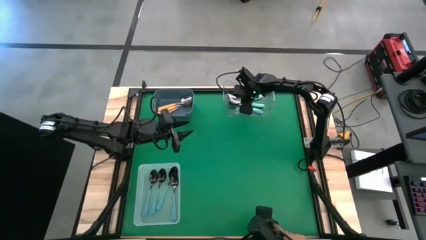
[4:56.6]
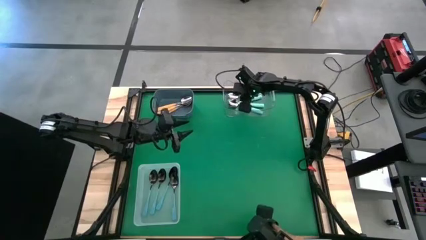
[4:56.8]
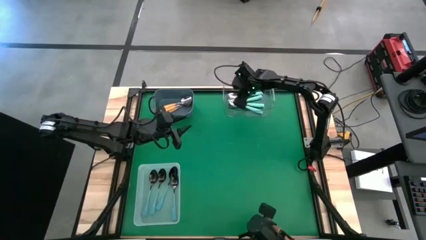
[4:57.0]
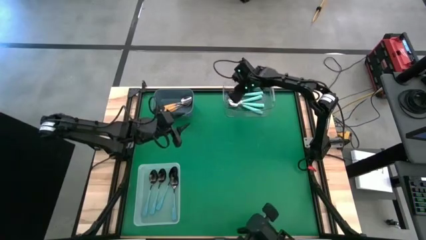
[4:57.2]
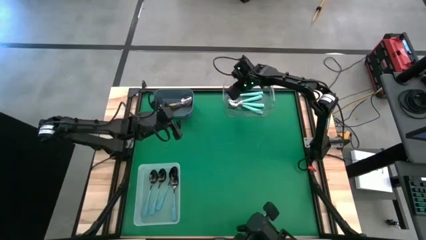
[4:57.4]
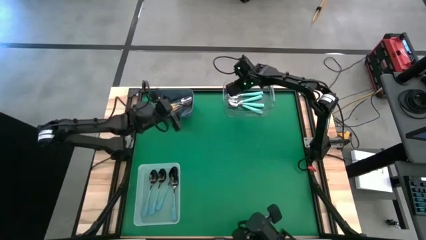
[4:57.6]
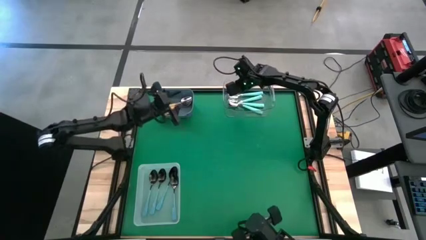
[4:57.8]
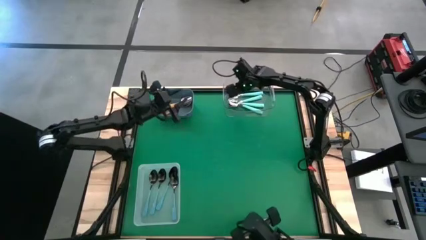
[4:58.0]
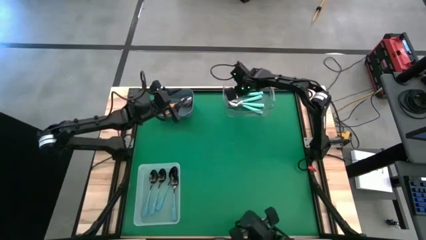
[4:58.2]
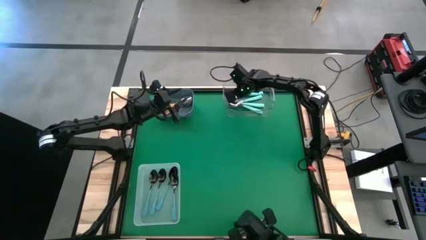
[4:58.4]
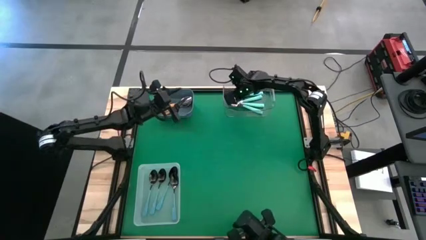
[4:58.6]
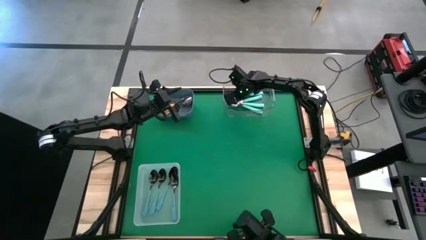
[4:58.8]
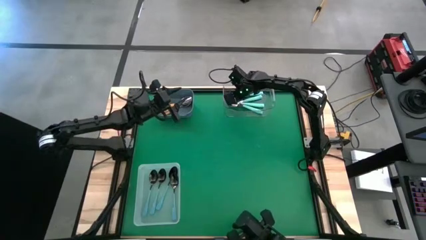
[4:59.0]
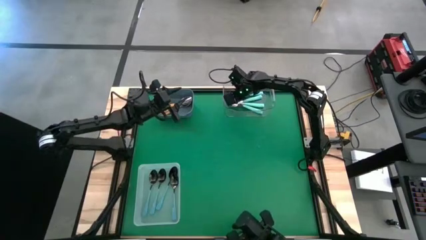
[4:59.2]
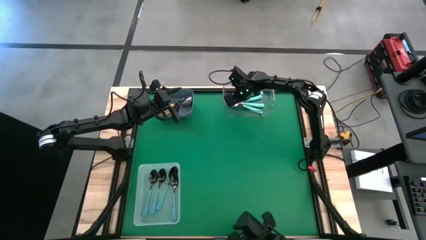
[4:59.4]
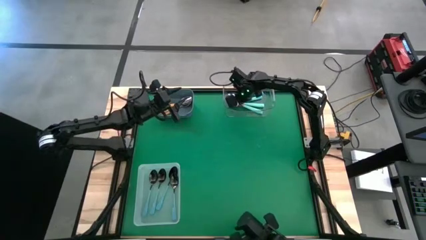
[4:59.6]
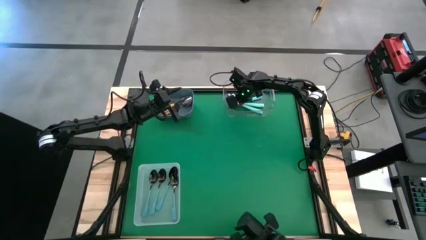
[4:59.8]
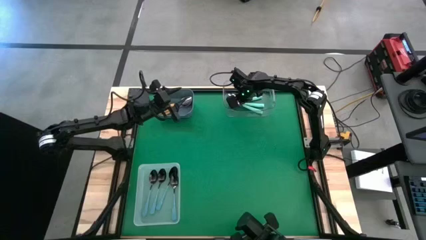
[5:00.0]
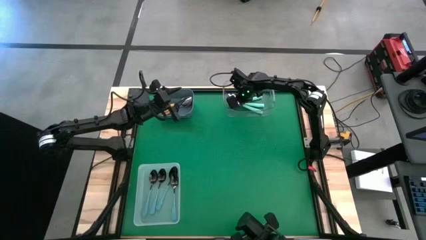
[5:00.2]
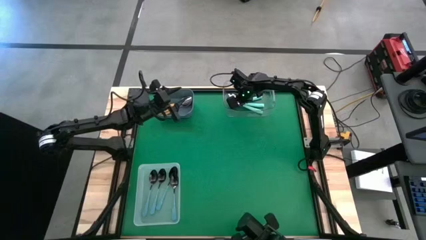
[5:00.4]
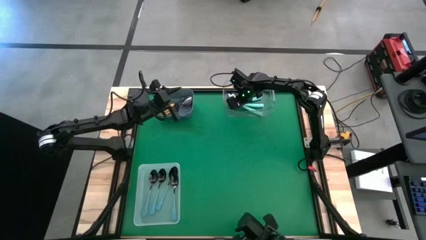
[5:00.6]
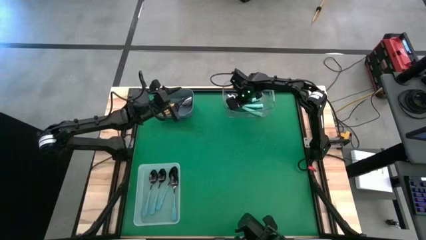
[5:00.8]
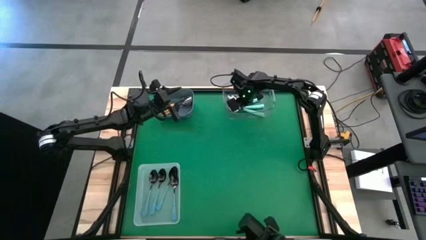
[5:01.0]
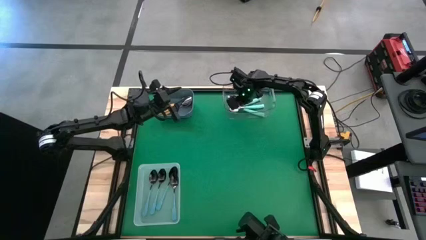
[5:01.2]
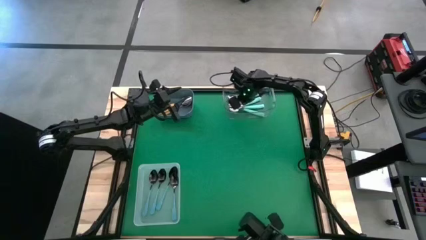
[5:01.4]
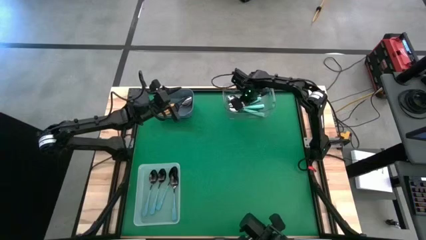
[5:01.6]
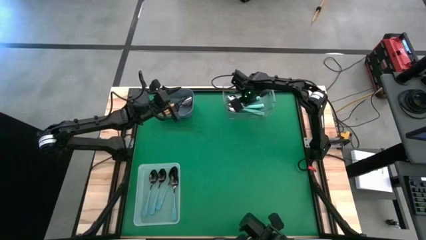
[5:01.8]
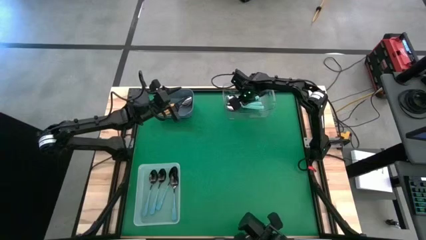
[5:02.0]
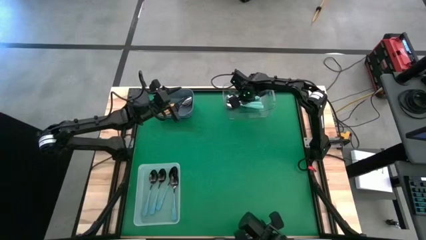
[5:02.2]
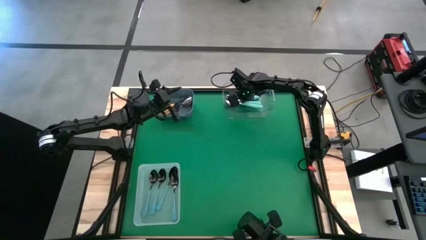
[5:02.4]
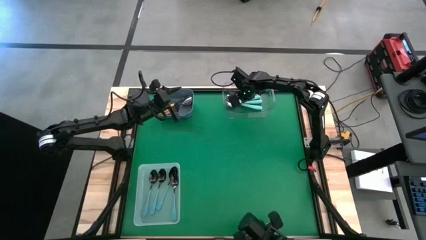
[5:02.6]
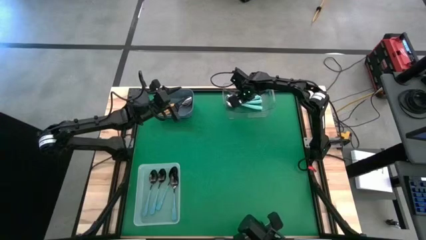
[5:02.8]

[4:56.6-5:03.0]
Task: Sort silverware by color (type)
Adjust the light blue spoon in the transparent bin

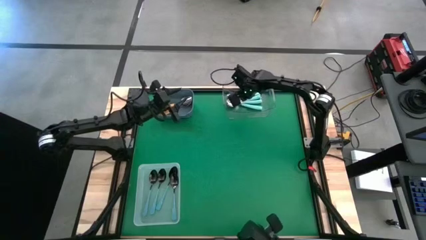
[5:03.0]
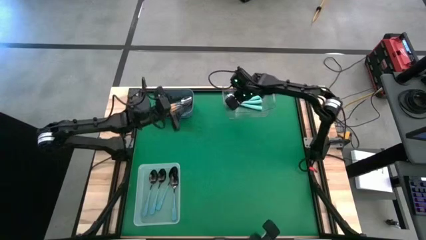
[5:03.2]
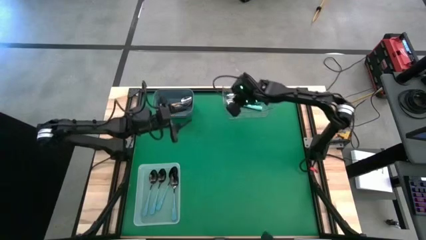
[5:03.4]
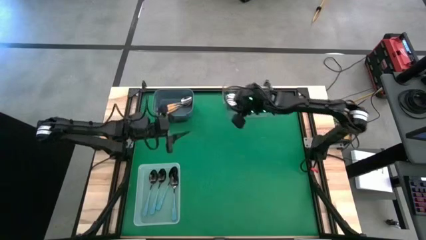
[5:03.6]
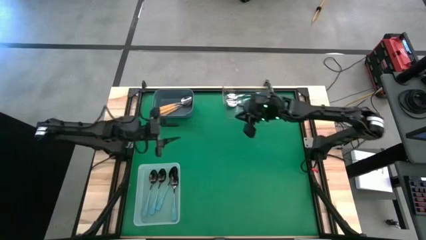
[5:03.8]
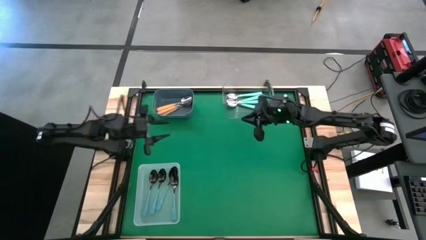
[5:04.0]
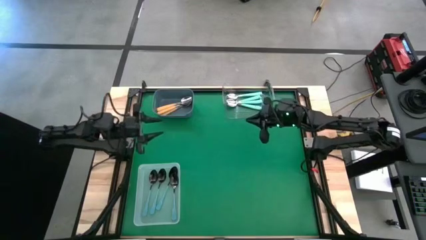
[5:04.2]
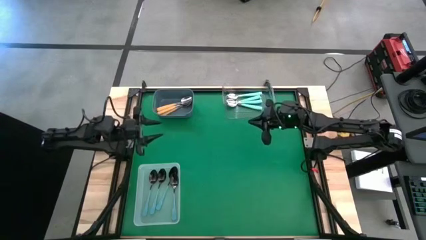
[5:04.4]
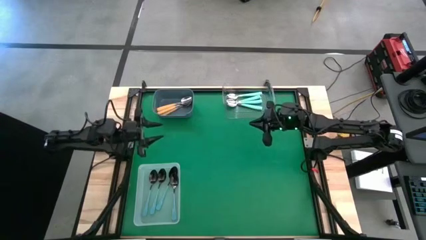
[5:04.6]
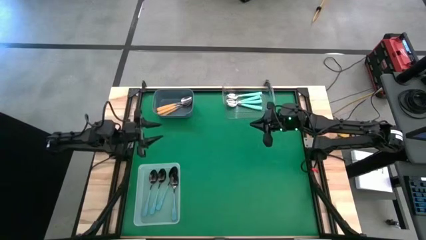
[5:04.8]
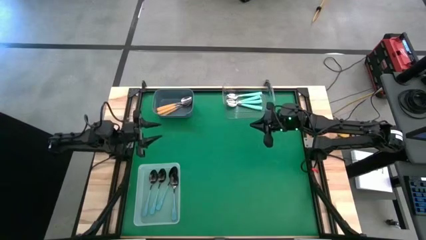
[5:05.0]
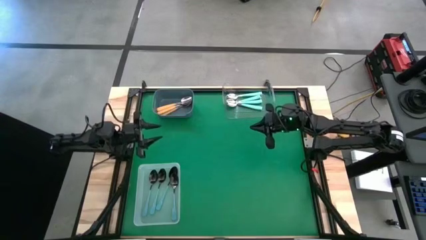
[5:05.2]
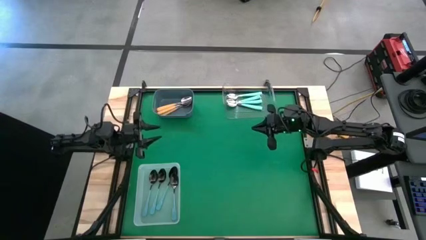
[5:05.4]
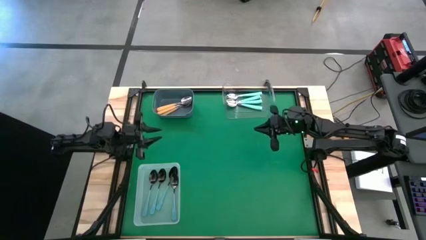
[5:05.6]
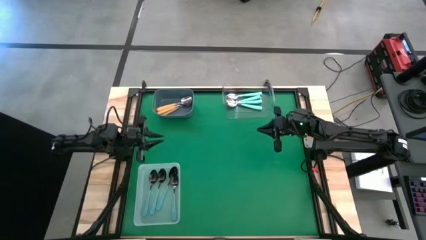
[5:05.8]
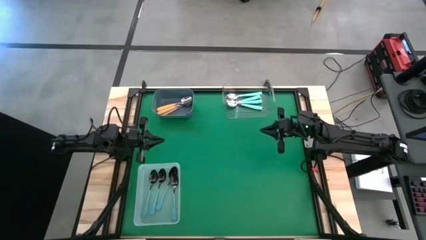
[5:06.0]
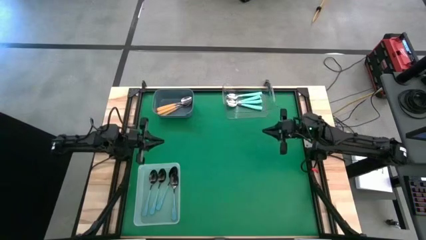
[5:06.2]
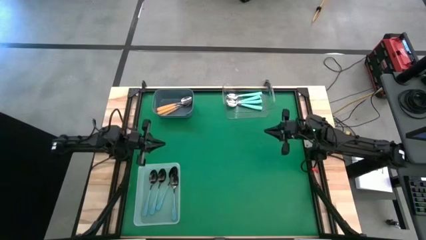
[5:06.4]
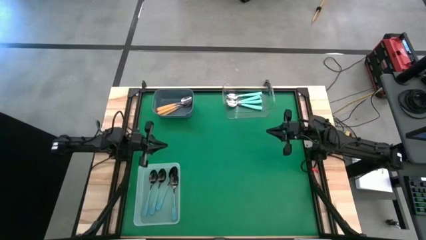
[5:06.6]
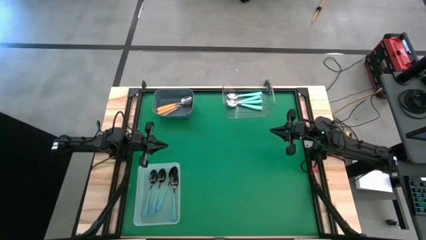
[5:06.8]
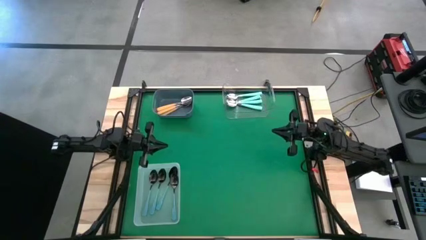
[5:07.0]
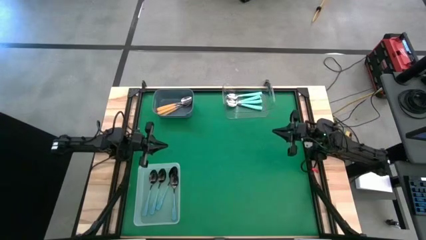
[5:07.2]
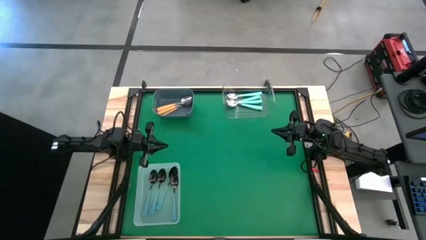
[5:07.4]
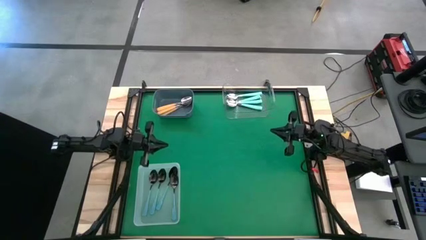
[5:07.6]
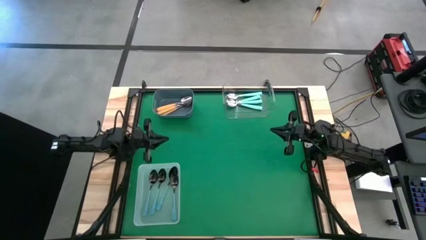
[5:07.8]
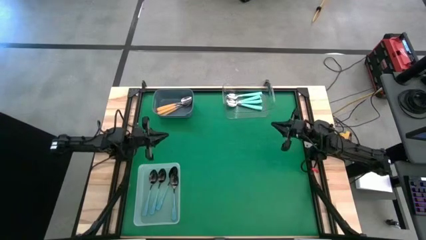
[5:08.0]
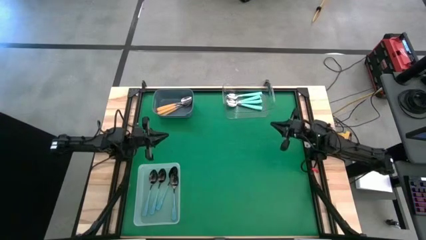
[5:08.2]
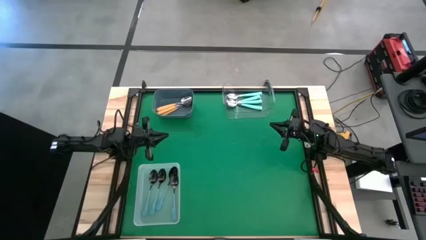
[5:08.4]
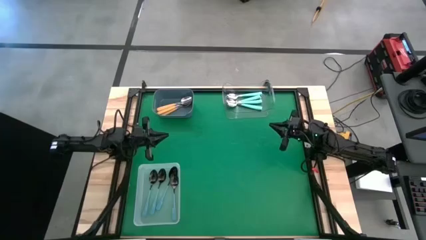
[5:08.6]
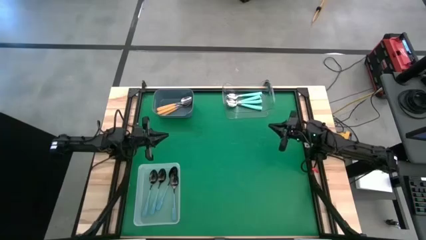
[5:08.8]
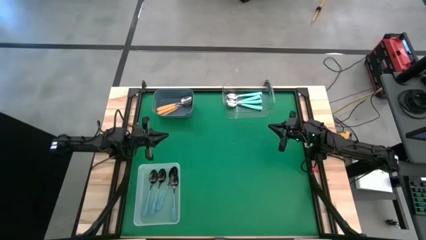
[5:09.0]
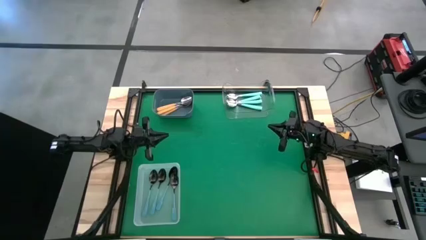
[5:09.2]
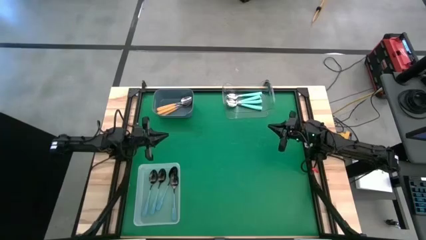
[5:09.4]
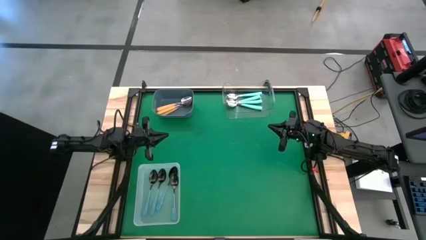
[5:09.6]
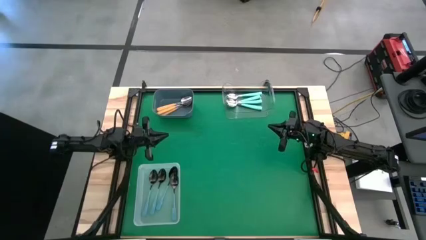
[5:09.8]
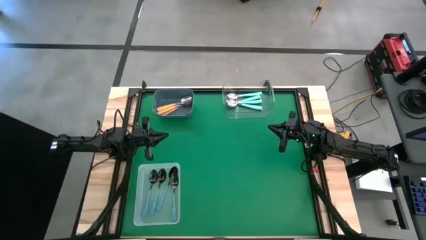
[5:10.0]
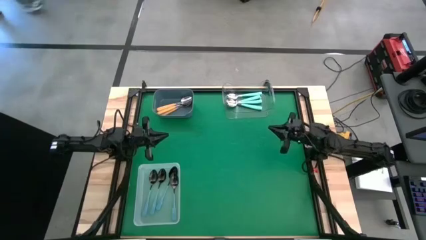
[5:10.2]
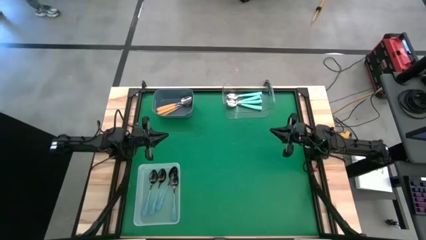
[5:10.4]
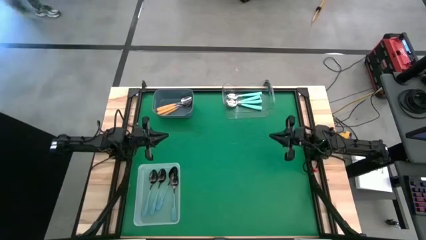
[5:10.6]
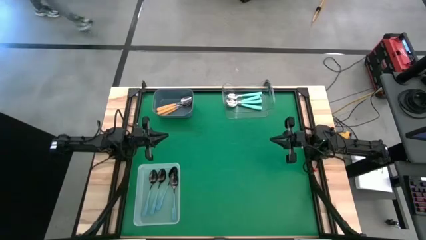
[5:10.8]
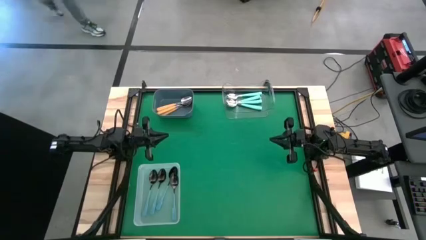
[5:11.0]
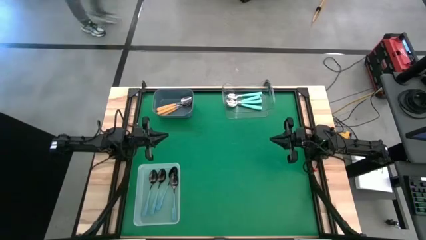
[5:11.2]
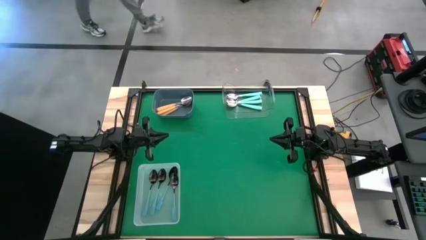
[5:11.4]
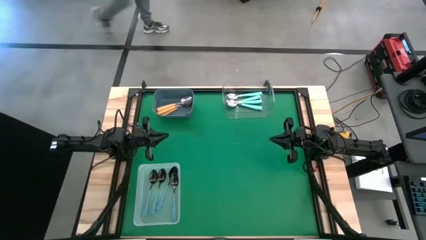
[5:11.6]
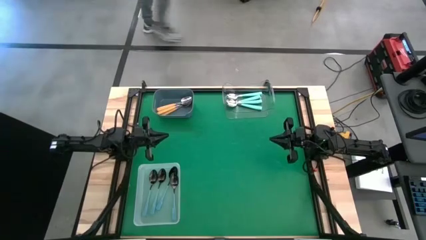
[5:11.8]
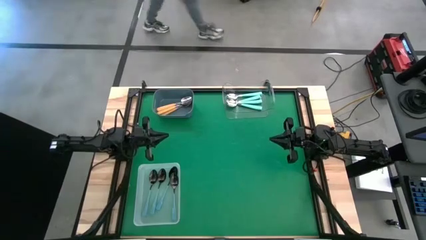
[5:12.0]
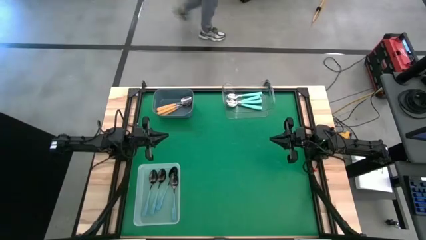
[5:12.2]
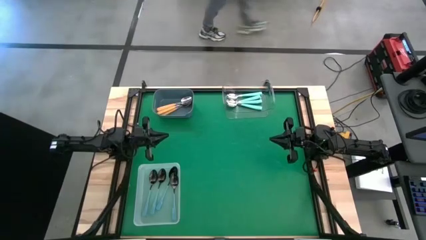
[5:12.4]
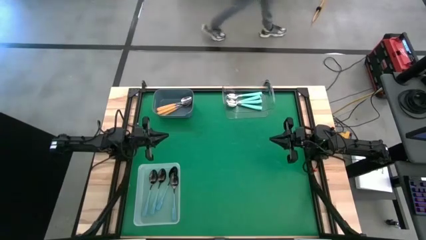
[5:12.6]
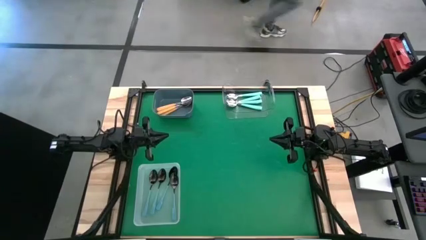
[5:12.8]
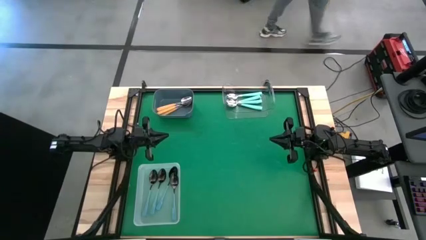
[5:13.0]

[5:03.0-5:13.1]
Return to Home Position
